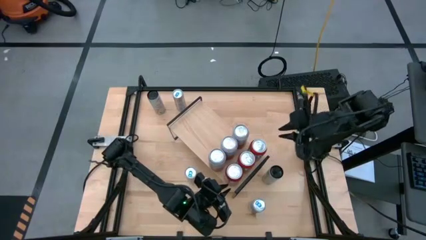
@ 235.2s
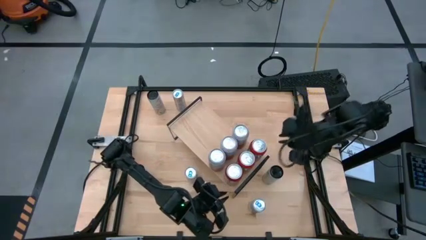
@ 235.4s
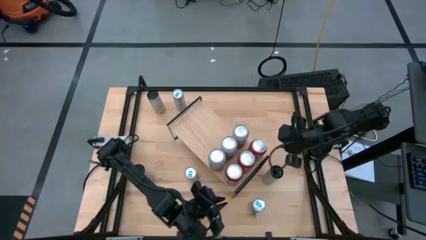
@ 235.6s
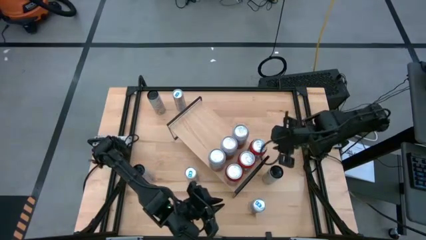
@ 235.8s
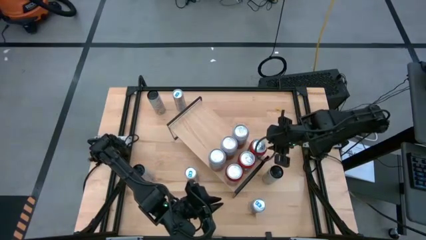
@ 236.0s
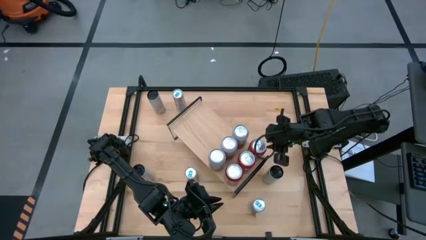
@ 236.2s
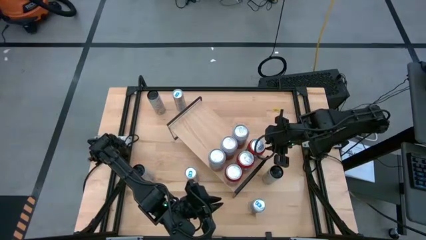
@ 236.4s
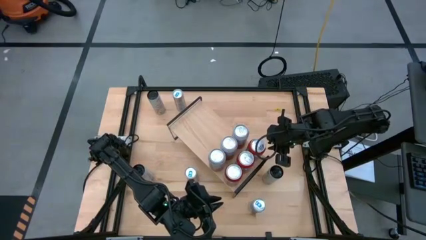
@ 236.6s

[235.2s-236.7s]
Task: Place canned beverage on shelf
Adjust the red soda can on the shelf

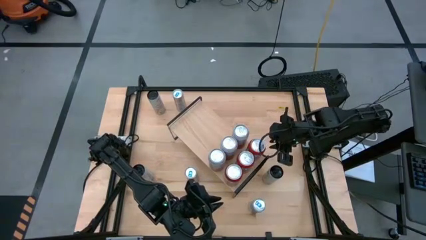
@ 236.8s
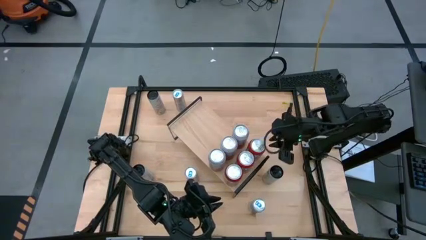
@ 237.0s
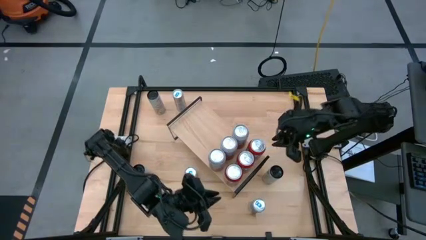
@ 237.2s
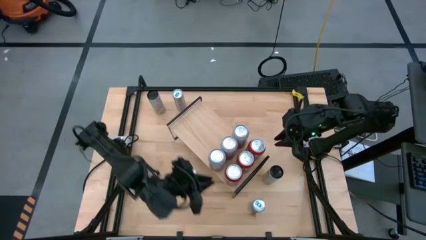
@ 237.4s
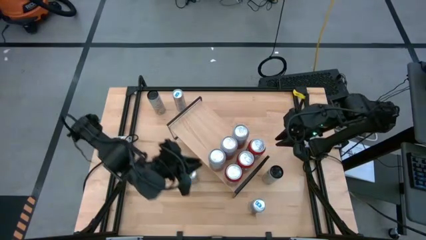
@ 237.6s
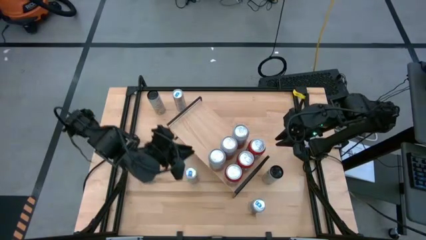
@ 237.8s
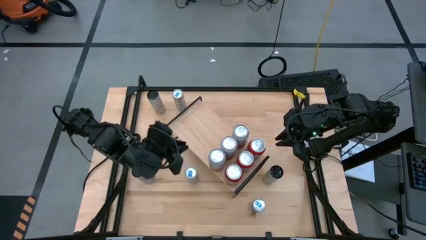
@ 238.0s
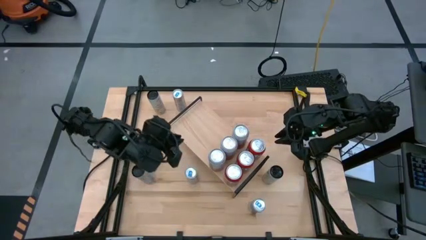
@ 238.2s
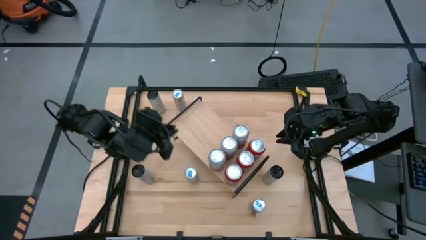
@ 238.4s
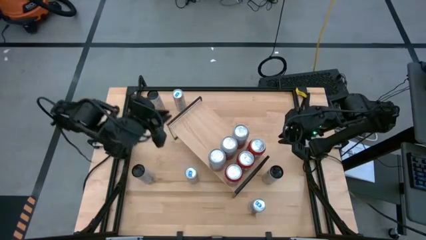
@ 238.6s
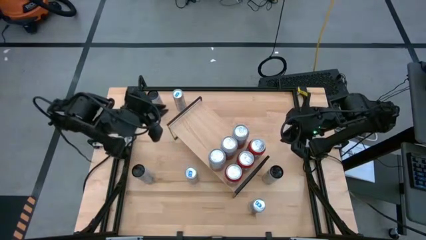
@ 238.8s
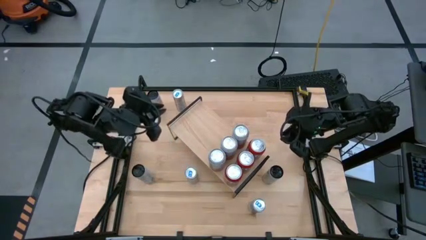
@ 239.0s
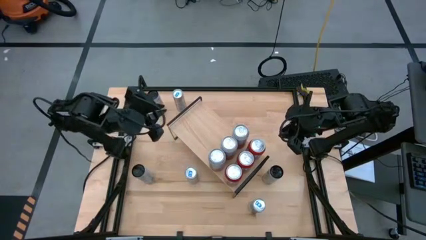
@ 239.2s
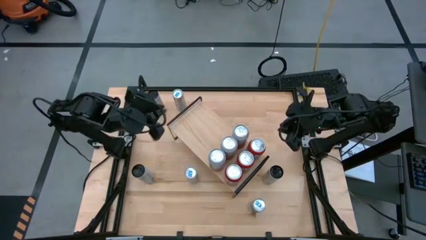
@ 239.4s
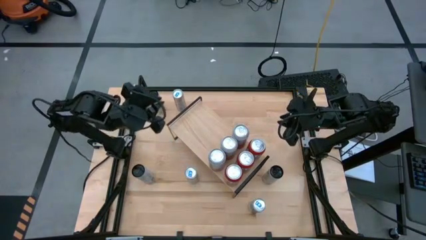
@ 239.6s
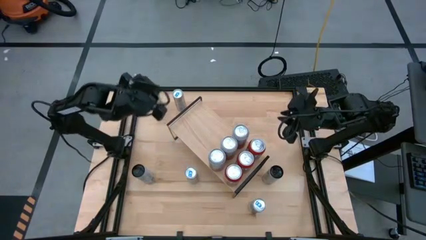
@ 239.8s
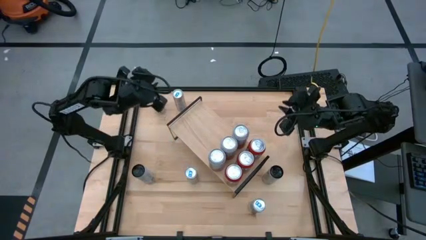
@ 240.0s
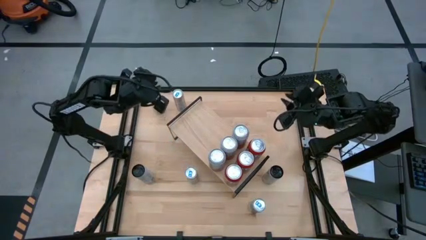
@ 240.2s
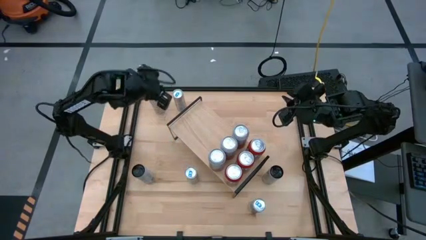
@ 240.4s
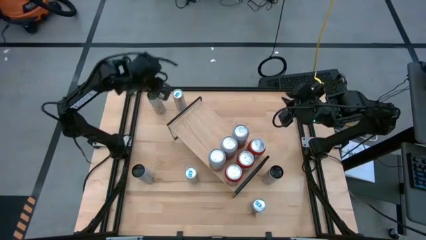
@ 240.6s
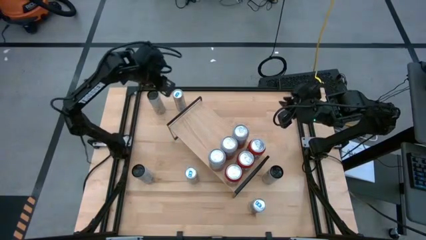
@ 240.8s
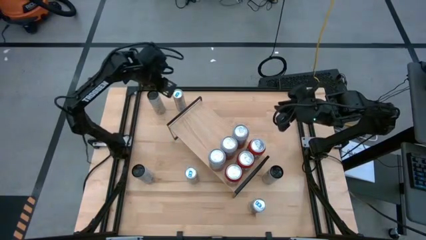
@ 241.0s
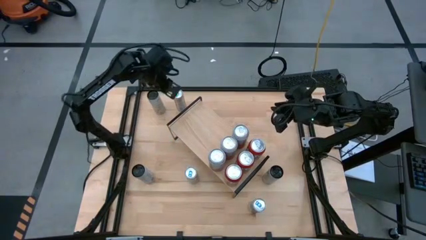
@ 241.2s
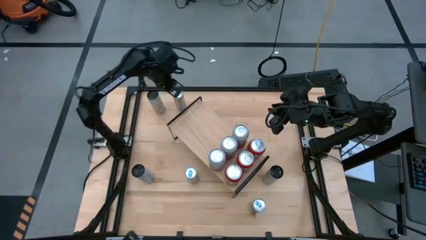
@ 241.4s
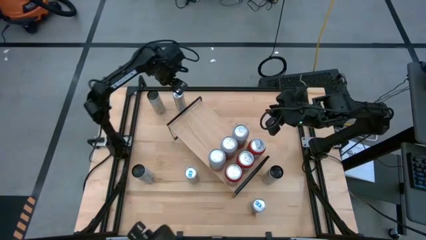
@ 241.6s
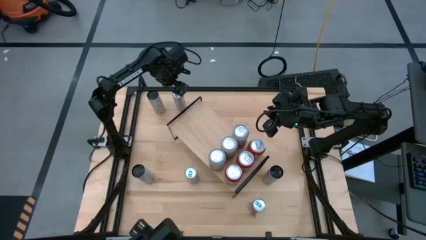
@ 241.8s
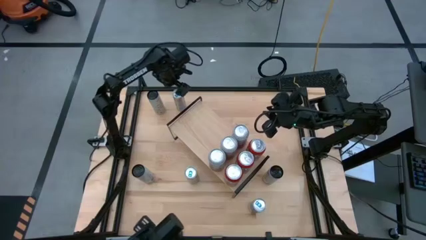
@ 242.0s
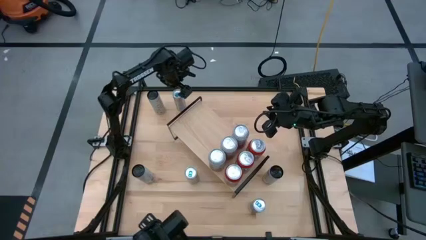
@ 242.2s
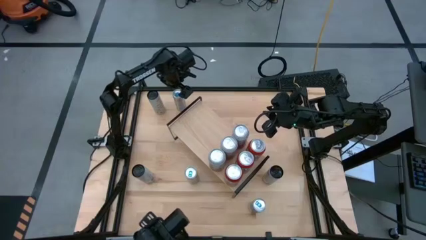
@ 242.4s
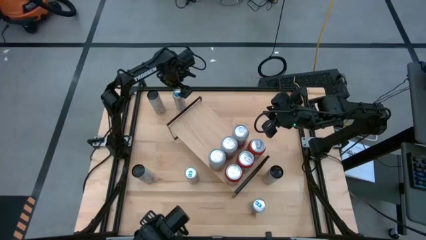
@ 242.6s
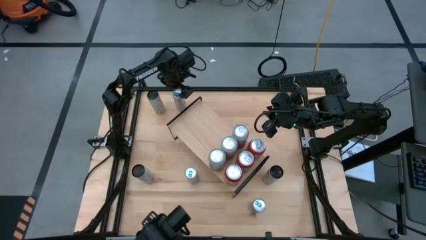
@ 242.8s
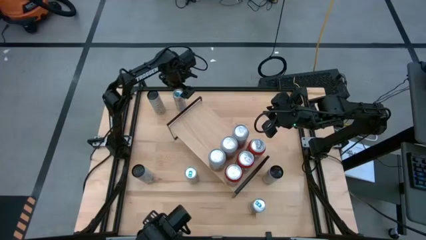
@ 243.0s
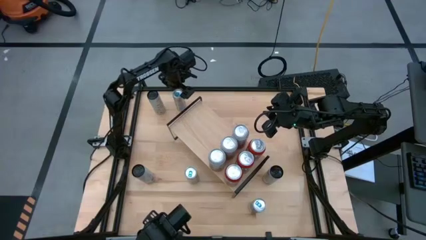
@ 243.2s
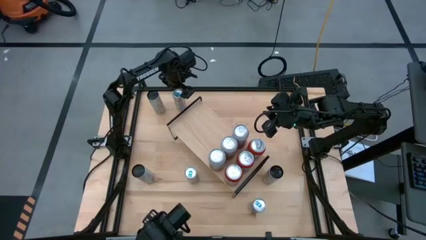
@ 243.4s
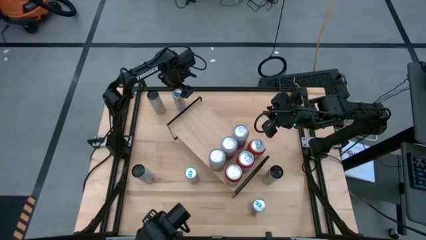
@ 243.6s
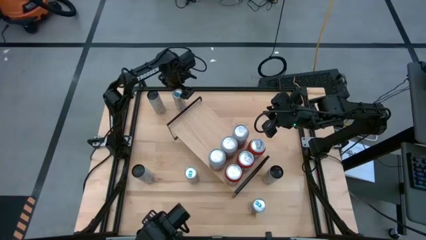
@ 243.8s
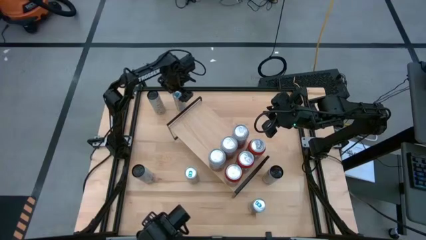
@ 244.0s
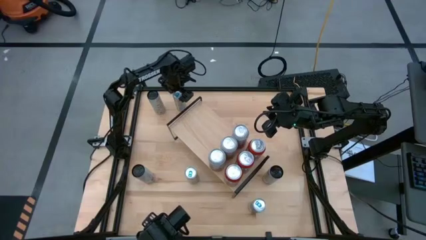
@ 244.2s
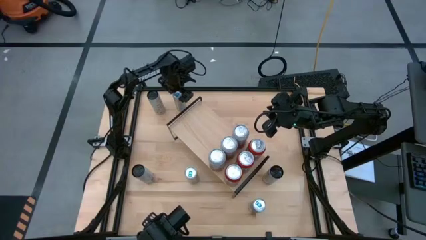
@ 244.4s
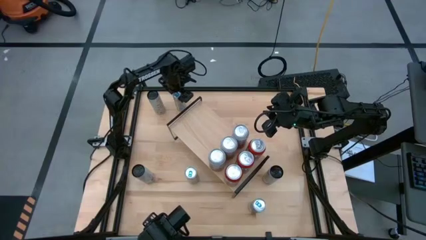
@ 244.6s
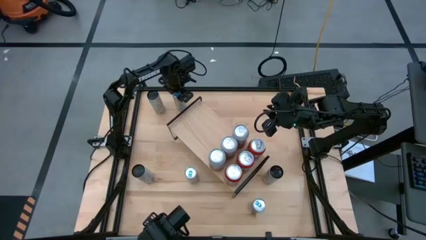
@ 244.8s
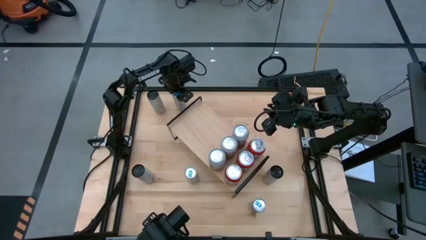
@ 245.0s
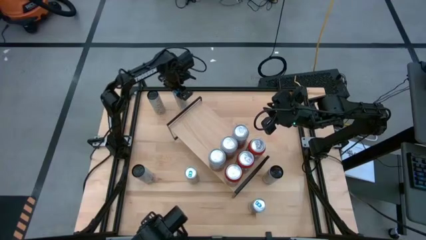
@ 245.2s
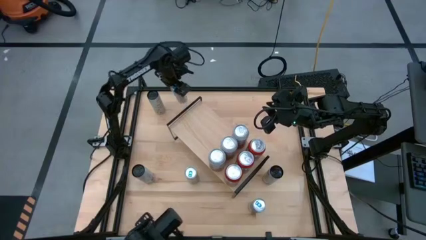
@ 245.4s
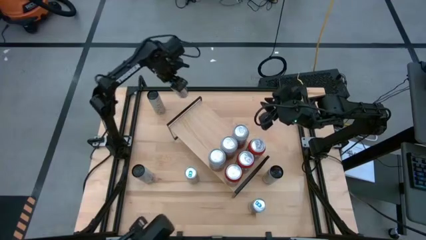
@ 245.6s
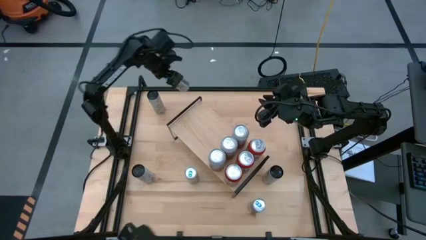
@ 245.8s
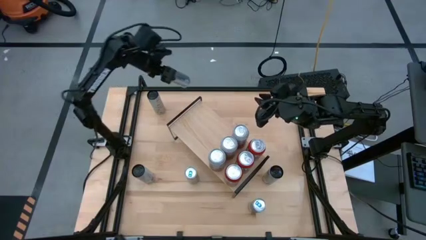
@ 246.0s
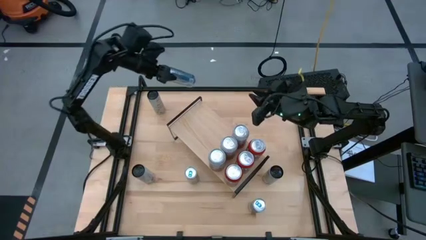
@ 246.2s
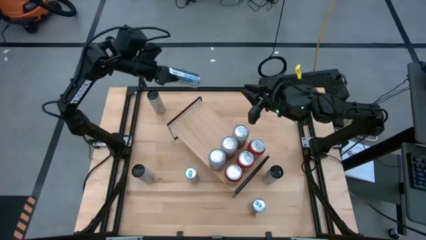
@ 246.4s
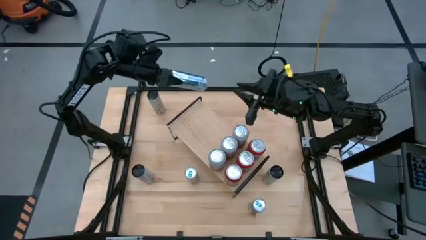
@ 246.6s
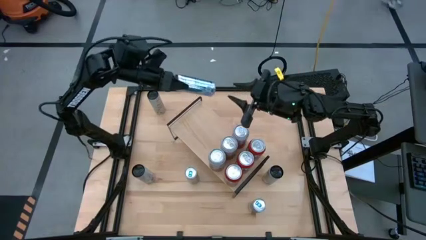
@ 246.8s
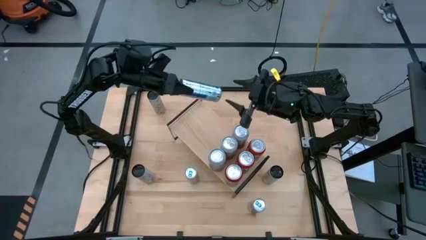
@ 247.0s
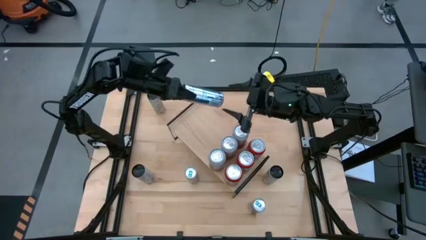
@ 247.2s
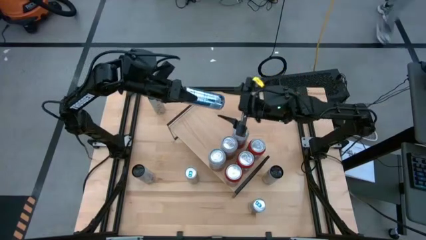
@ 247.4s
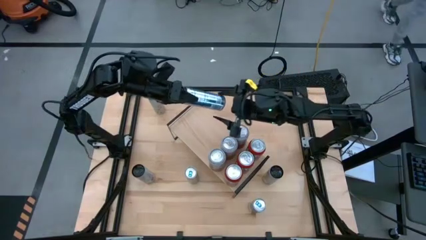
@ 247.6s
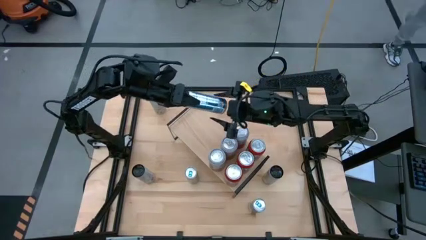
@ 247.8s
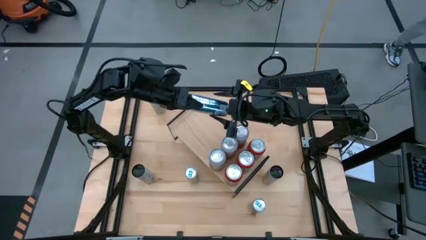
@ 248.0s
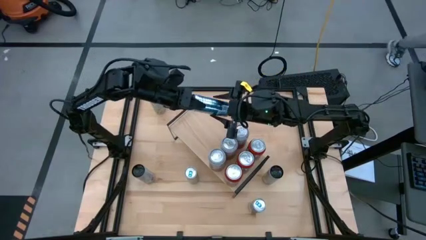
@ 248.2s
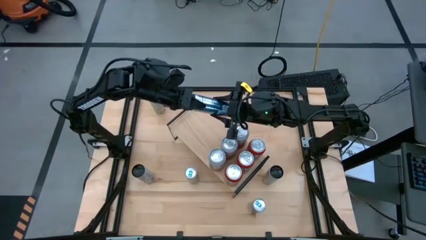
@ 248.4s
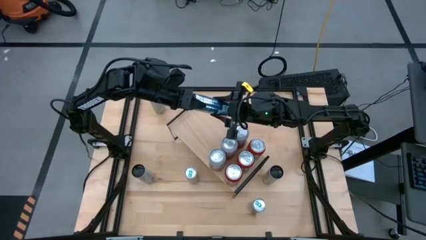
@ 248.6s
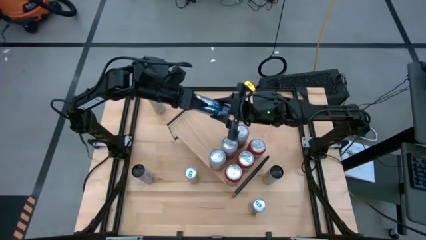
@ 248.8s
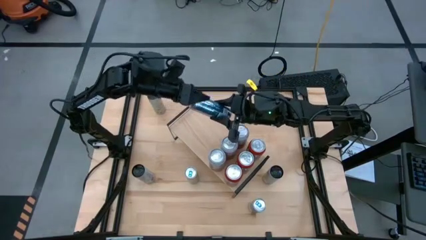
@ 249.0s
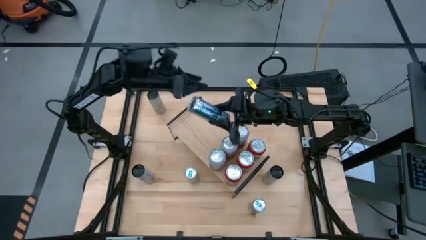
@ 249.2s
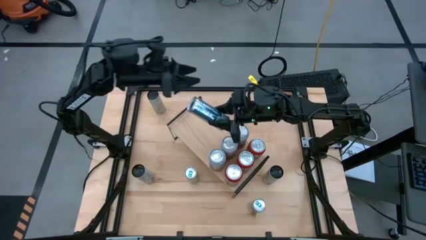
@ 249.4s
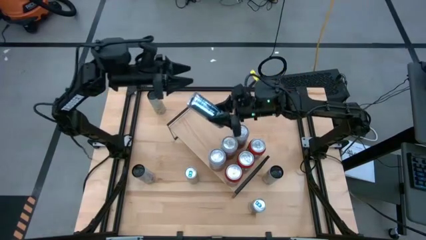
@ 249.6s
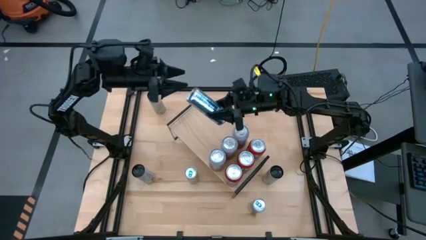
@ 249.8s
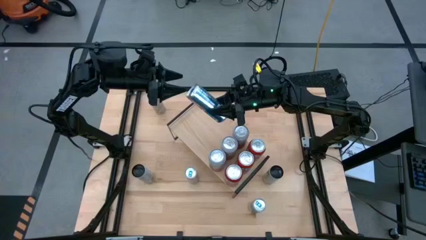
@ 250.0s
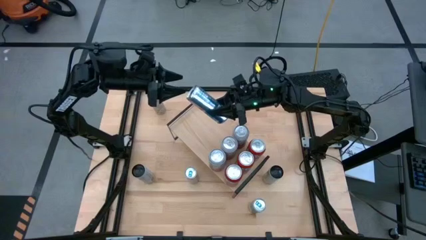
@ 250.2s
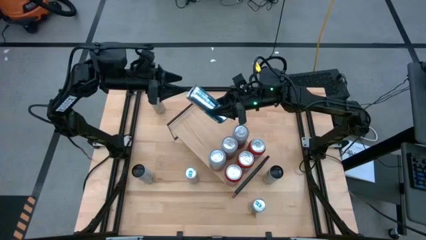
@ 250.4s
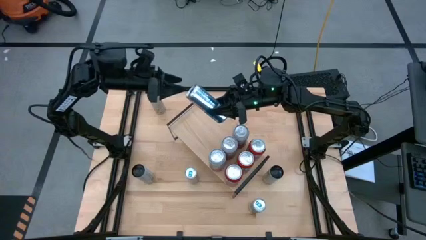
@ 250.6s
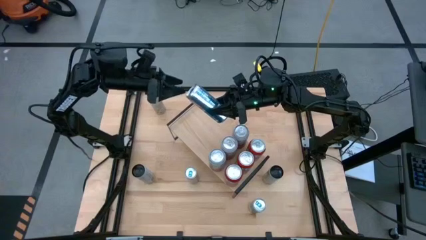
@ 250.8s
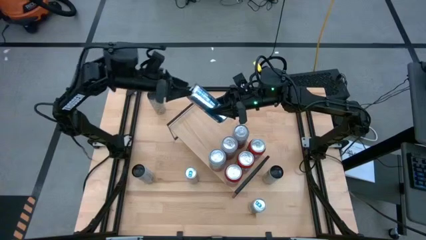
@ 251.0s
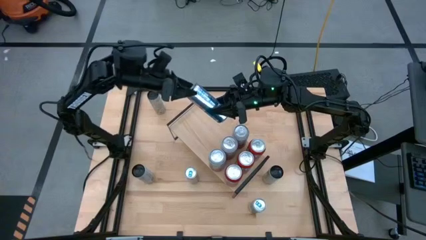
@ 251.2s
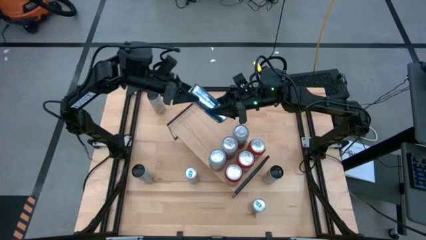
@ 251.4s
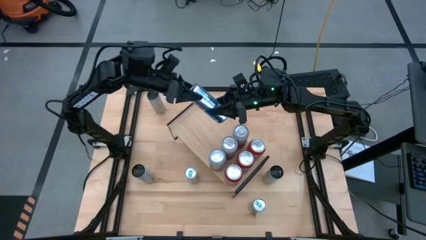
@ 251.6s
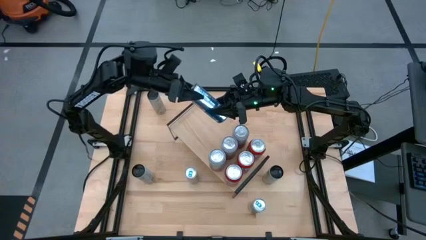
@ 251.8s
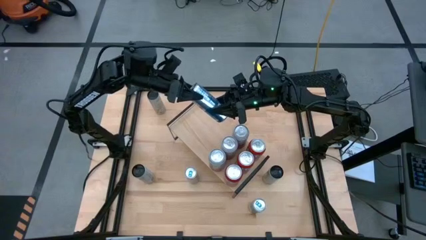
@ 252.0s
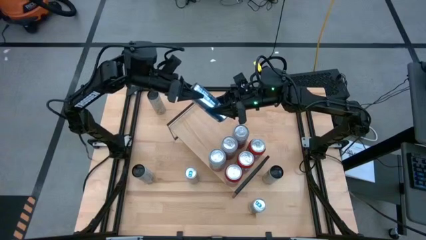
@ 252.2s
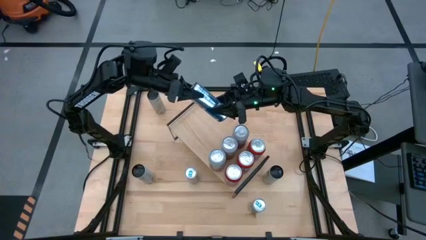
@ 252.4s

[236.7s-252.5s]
Put the top blue soda can on the shelf
